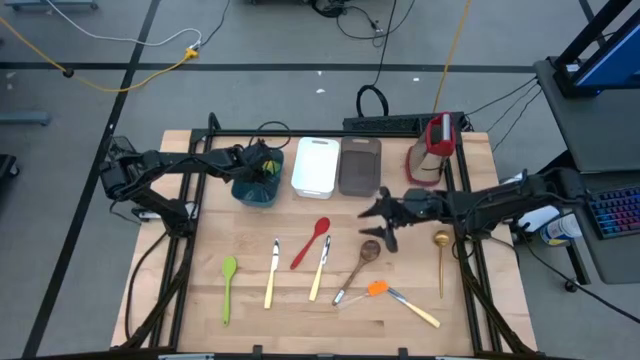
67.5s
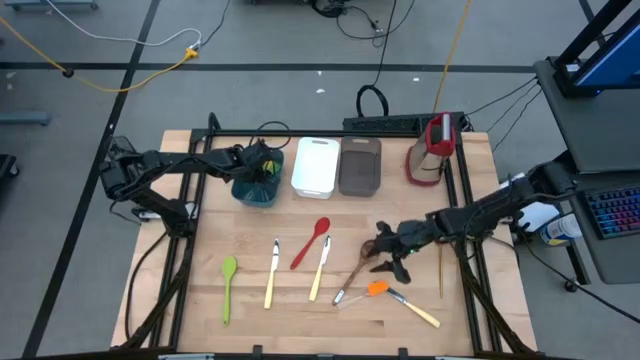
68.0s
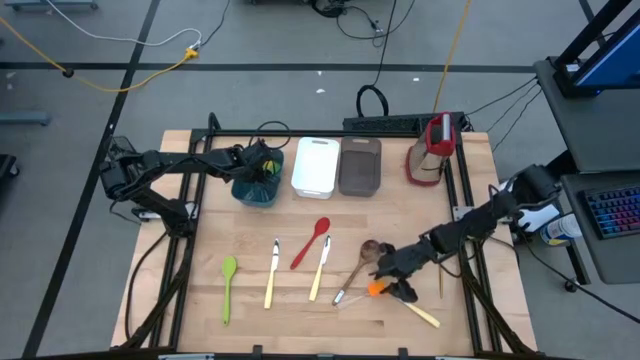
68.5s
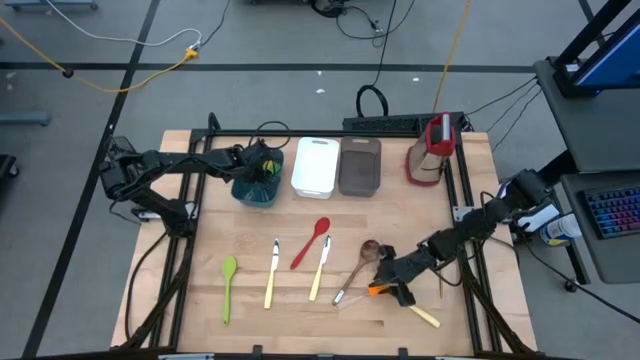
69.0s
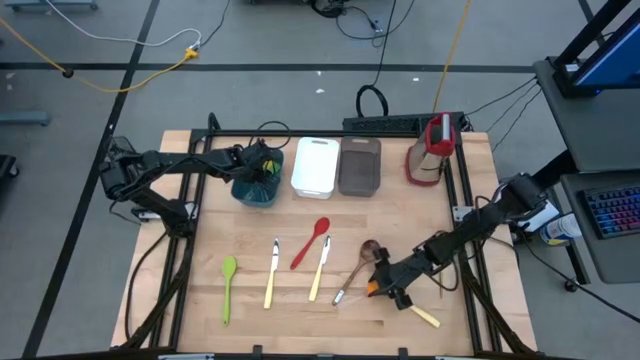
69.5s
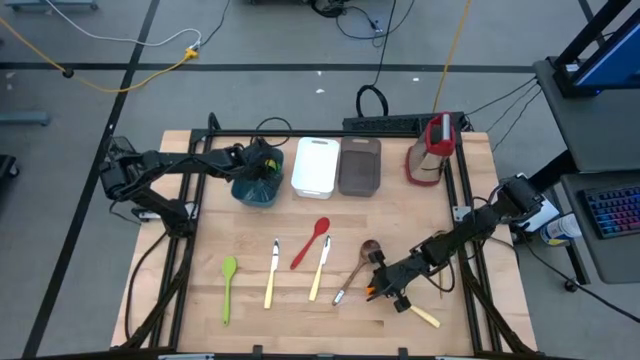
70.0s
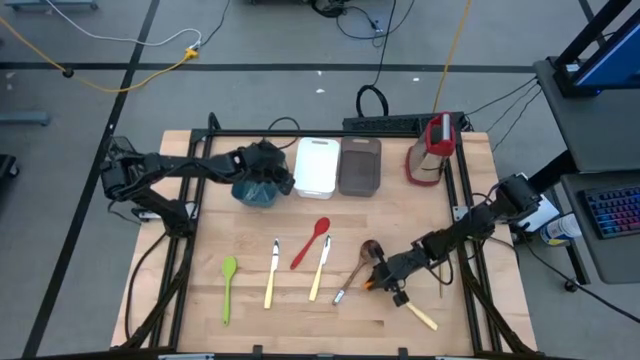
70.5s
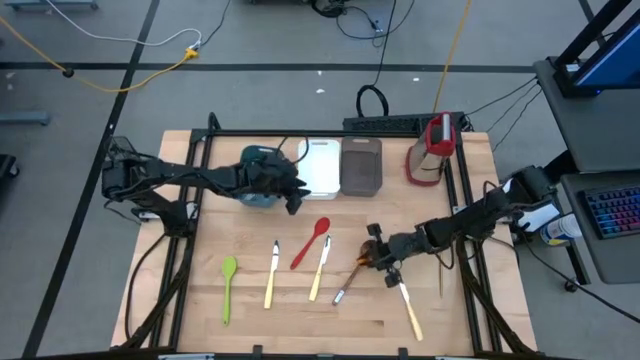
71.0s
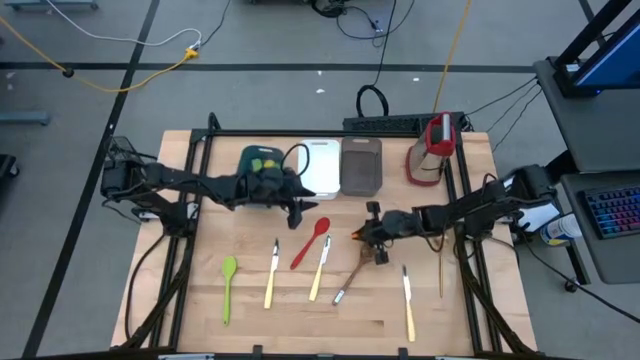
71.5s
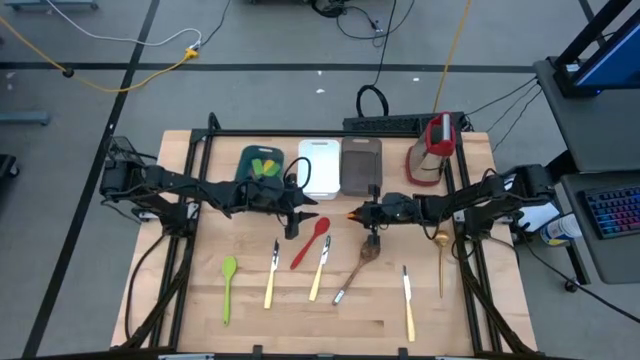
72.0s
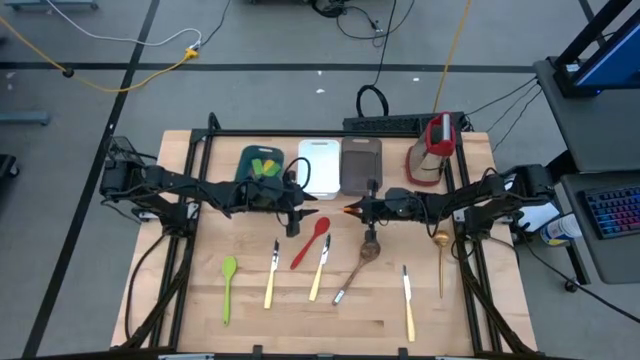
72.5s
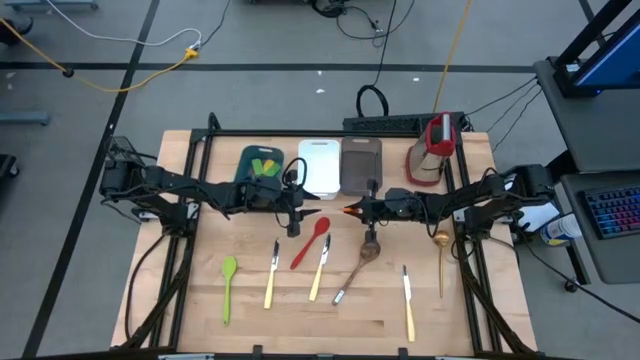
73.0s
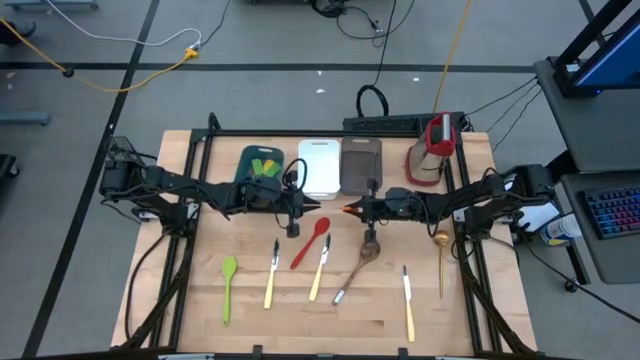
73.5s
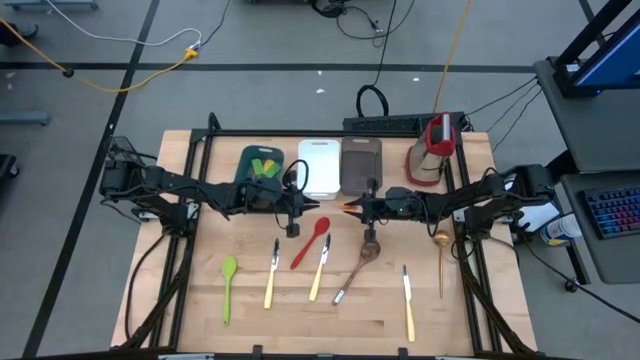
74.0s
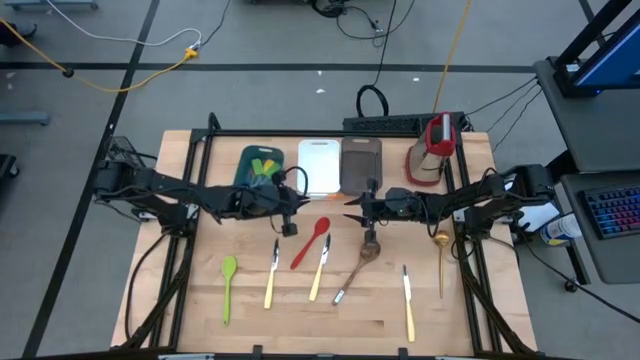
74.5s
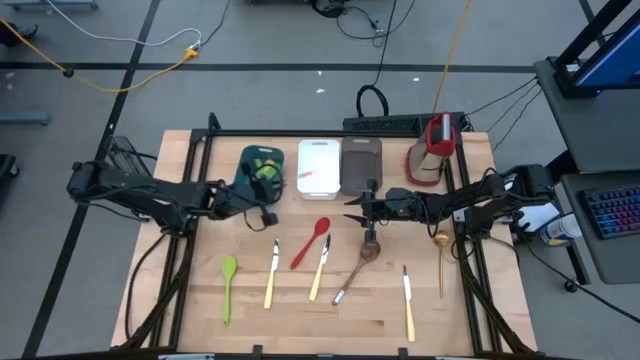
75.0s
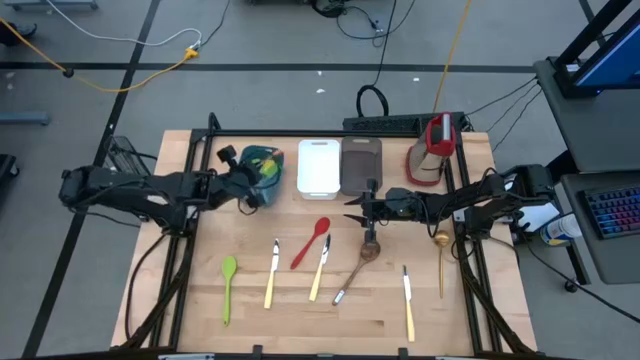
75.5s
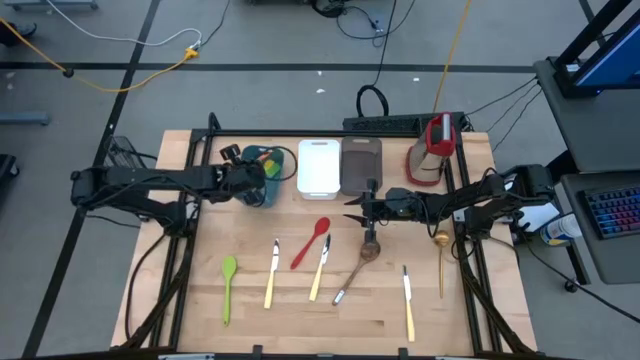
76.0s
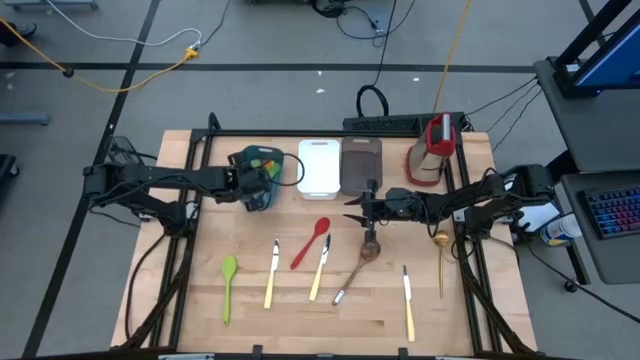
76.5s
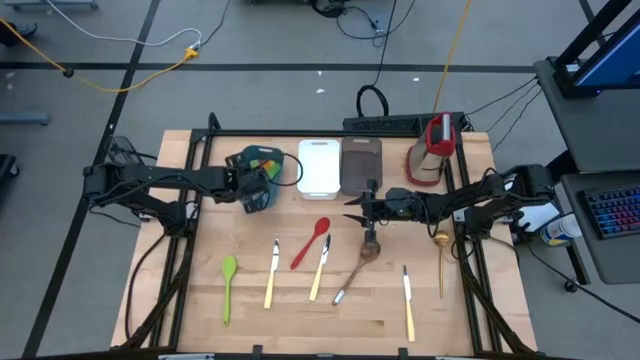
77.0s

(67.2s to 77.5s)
Task: Pick & Place Kitchen Items
Put the orange spatula into the blue bin

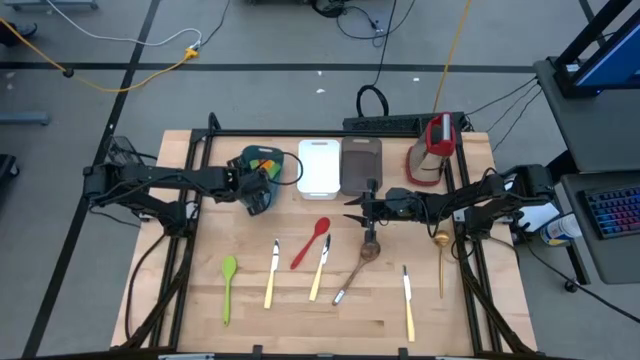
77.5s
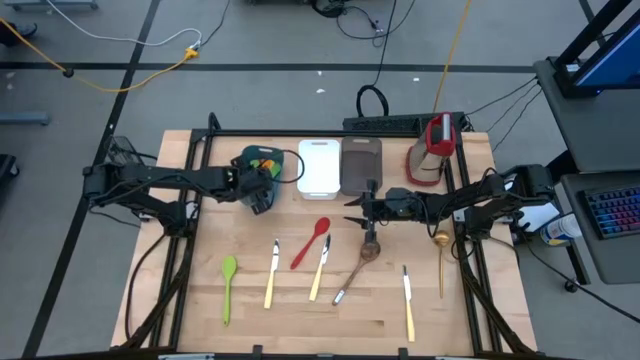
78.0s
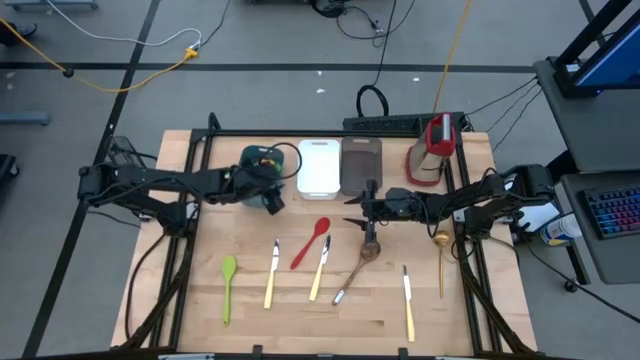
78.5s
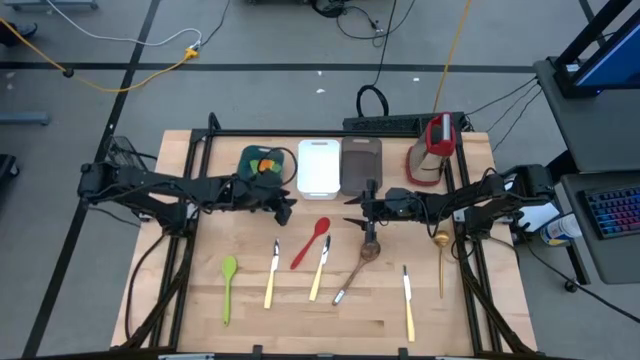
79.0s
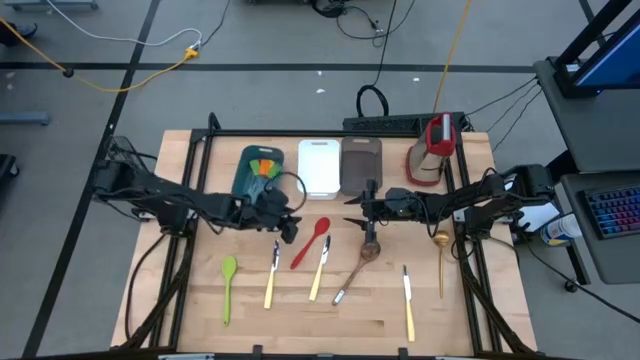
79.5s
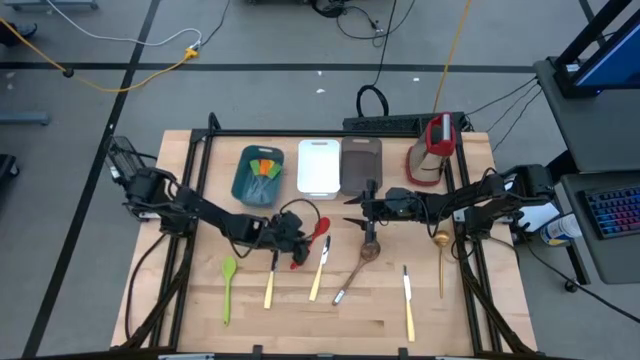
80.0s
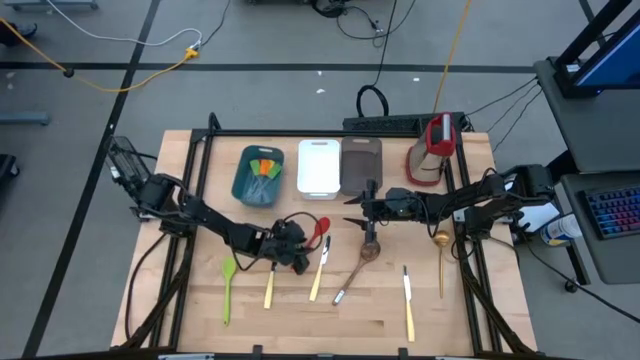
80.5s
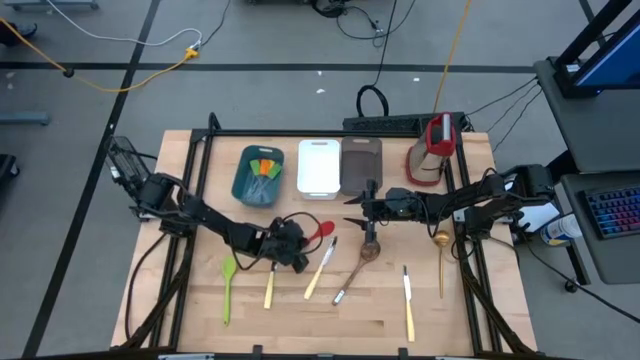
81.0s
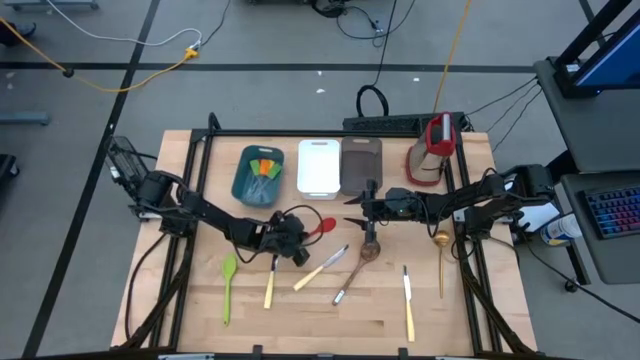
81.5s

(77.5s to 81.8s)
Put the red serving spoon into the white bin

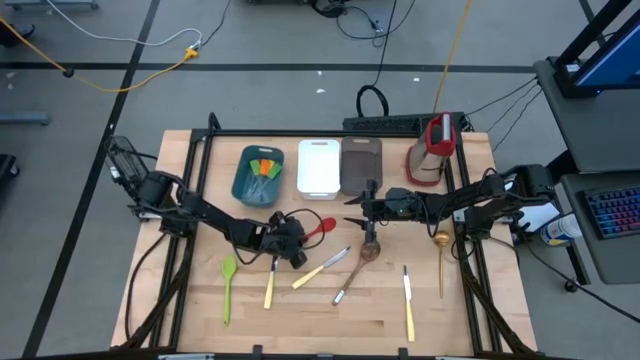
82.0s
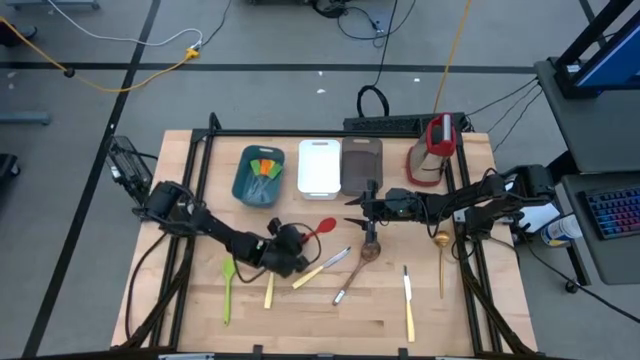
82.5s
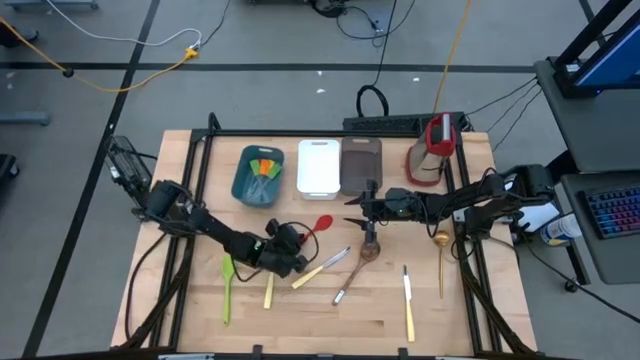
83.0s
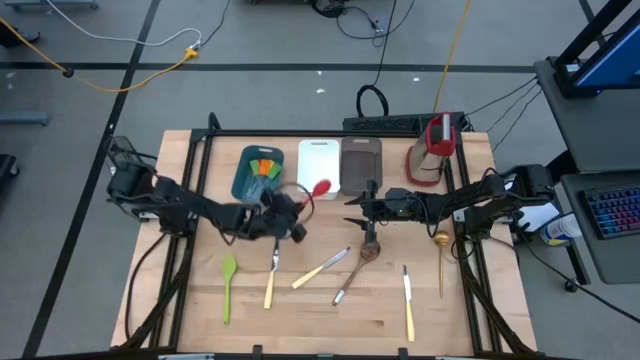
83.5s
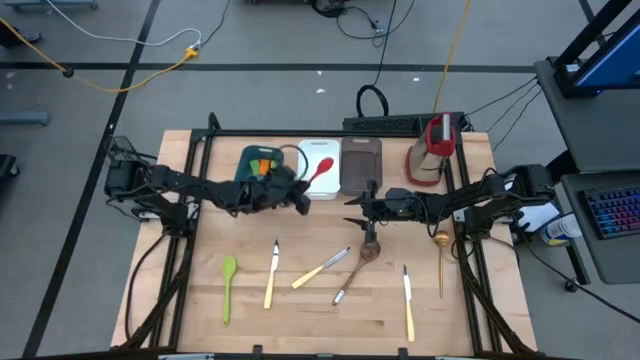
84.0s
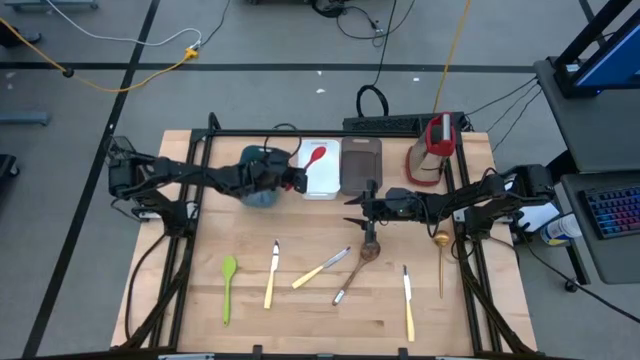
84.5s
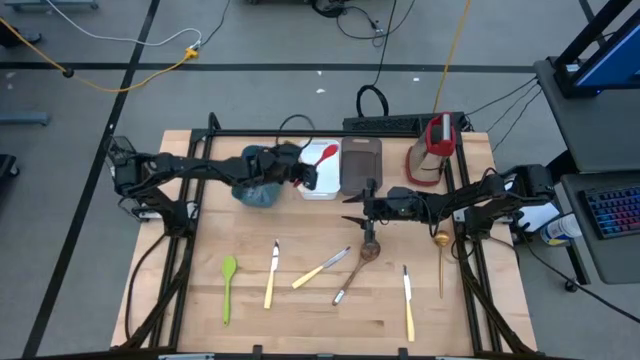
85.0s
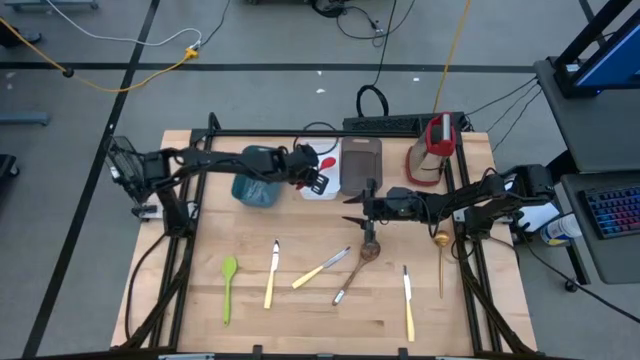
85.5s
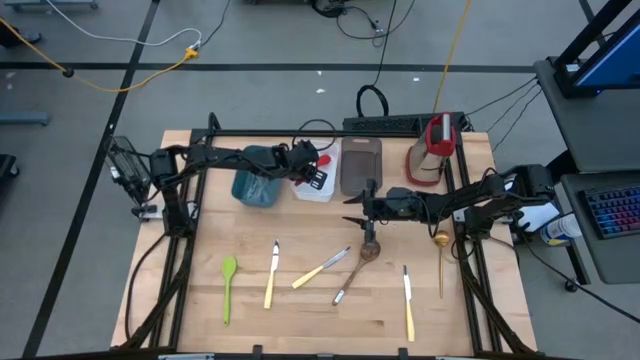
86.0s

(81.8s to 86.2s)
Put the red serving spoon into the white bin

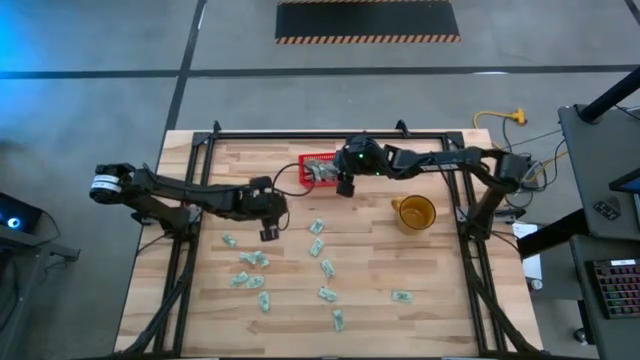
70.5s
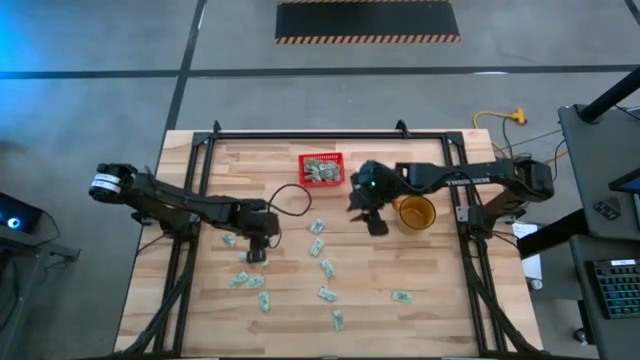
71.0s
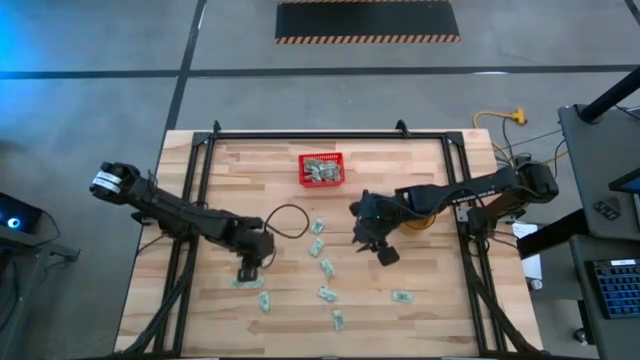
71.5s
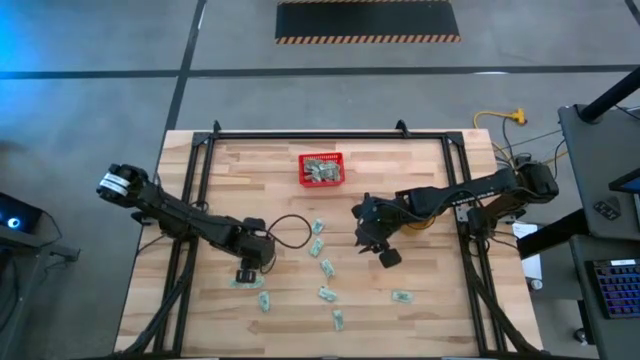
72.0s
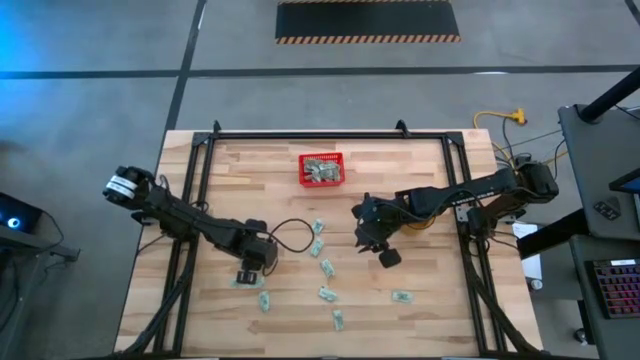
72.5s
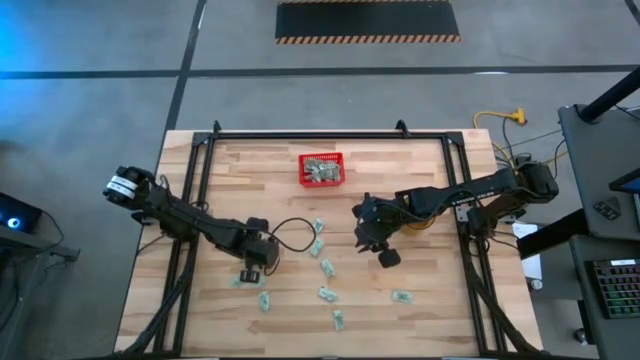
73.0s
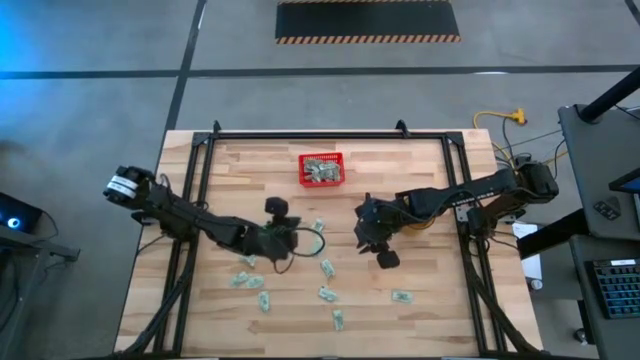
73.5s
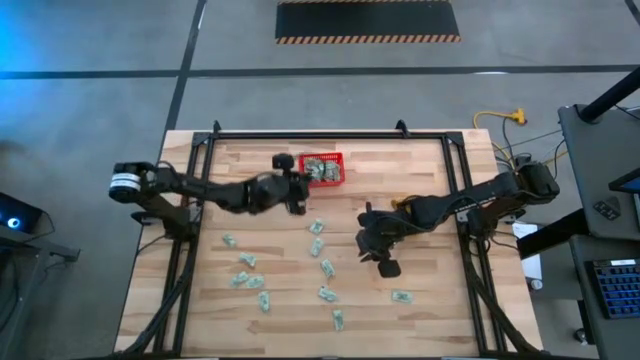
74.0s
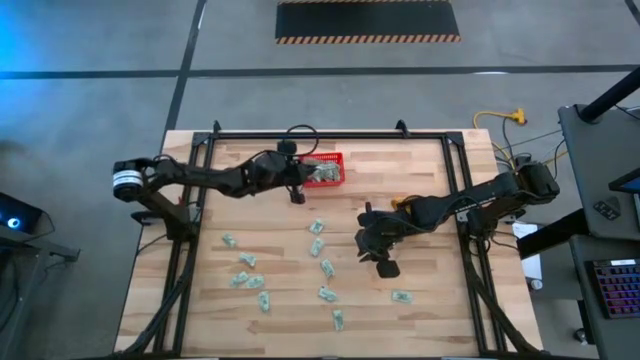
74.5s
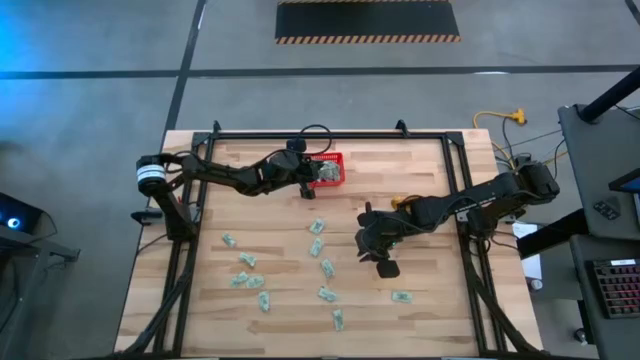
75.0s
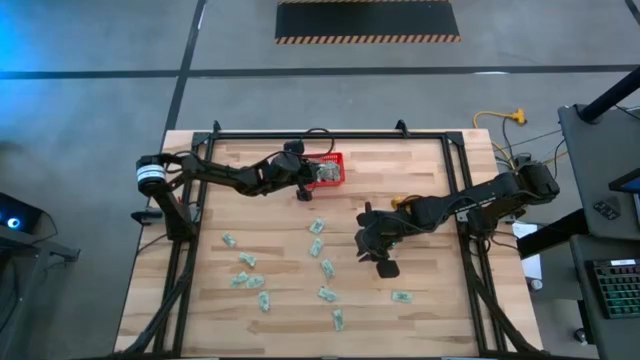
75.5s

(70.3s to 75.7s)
Task: Pick and place Stevia / Truvia into bins
Put the white stevia packet into the red bin
